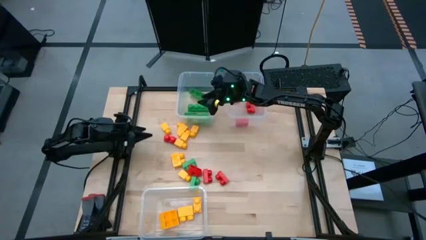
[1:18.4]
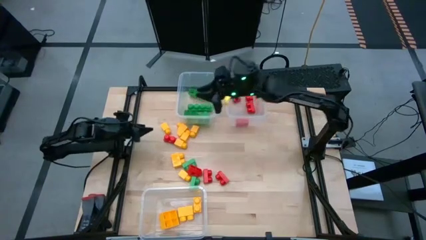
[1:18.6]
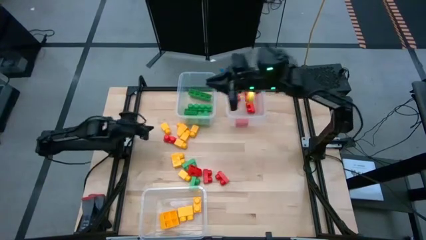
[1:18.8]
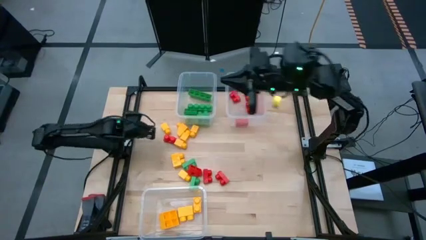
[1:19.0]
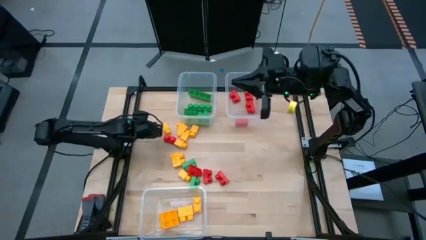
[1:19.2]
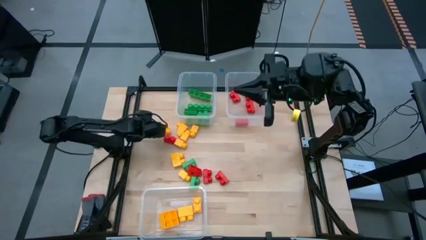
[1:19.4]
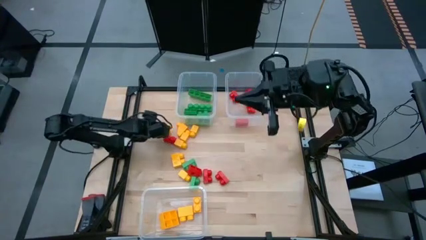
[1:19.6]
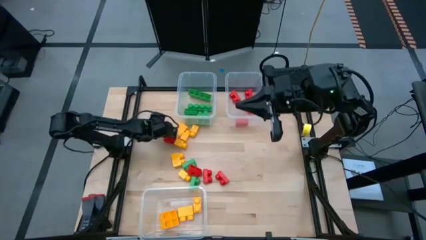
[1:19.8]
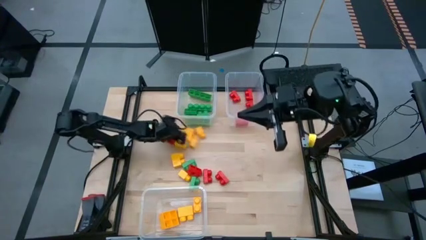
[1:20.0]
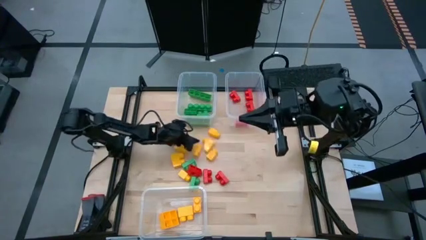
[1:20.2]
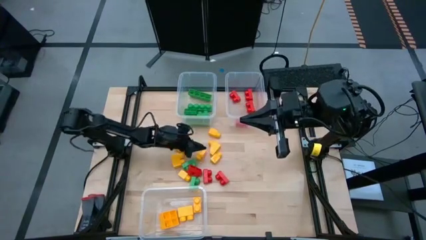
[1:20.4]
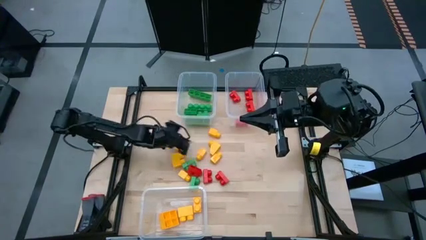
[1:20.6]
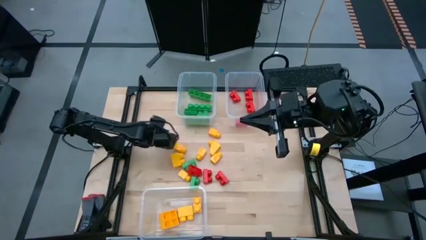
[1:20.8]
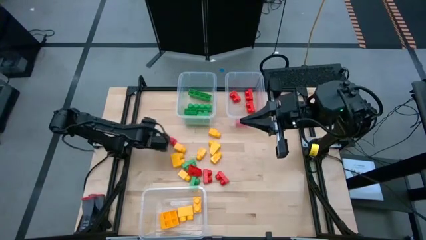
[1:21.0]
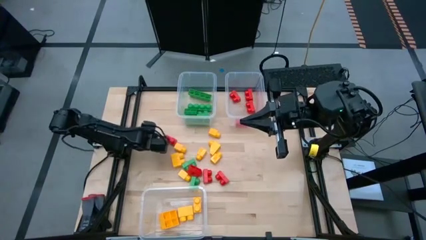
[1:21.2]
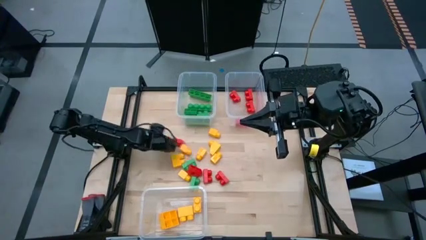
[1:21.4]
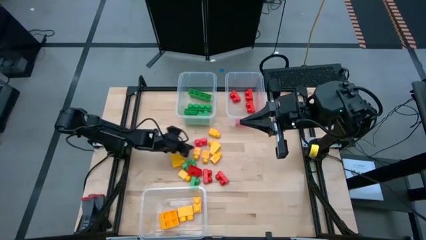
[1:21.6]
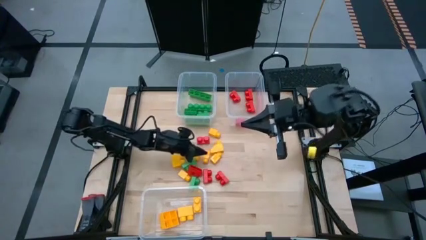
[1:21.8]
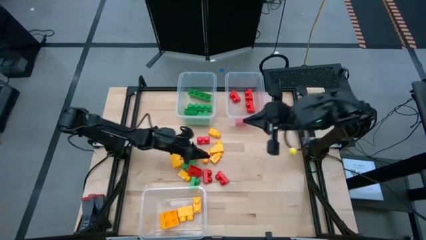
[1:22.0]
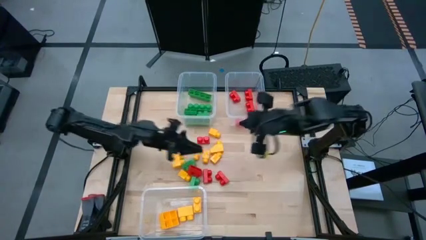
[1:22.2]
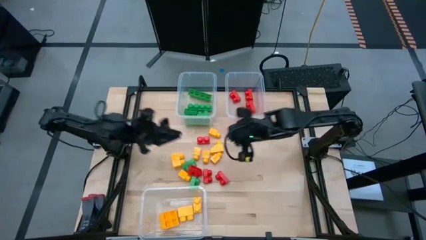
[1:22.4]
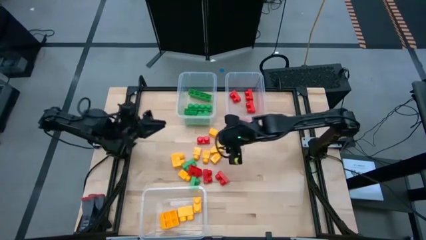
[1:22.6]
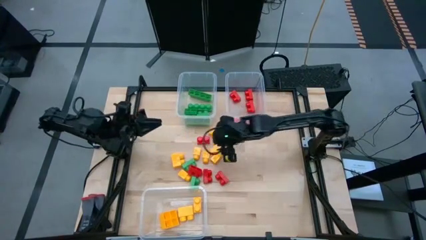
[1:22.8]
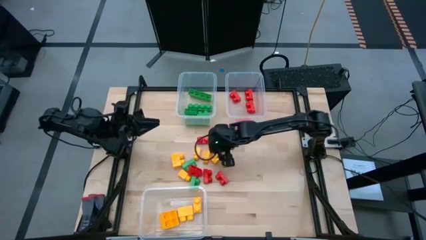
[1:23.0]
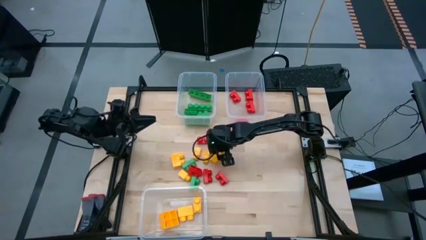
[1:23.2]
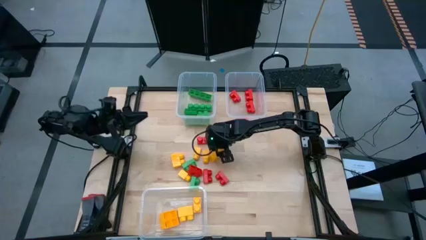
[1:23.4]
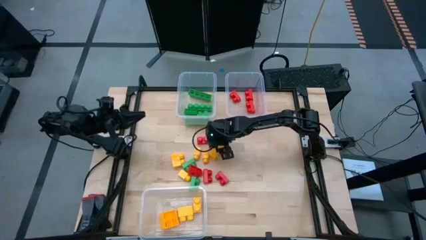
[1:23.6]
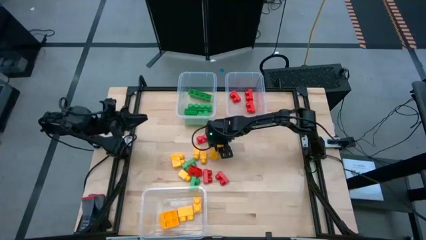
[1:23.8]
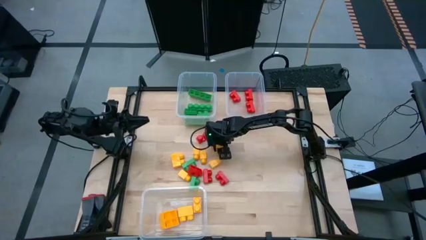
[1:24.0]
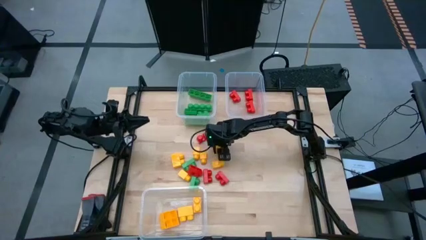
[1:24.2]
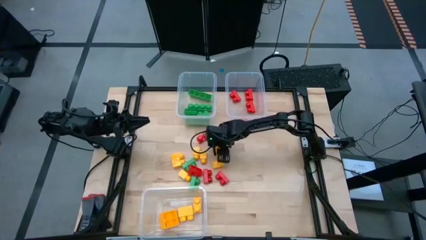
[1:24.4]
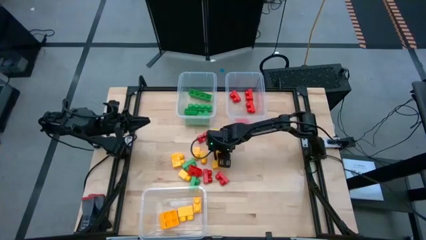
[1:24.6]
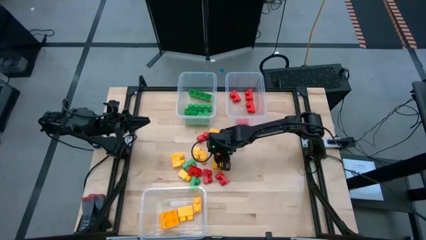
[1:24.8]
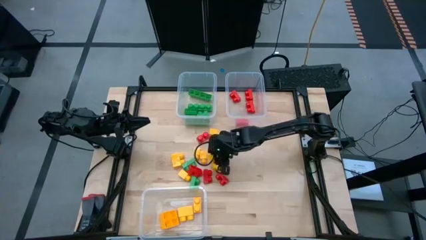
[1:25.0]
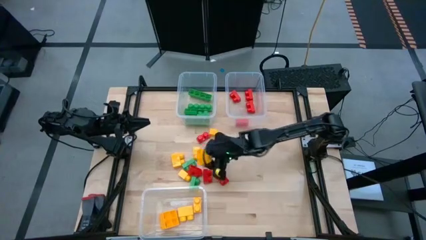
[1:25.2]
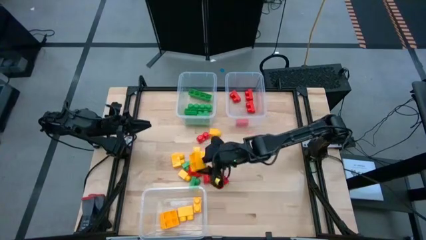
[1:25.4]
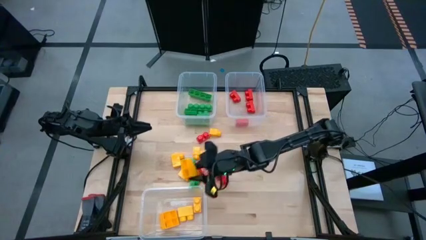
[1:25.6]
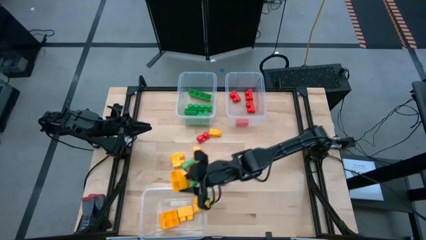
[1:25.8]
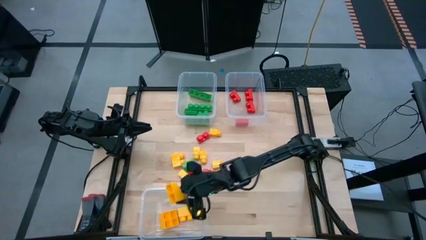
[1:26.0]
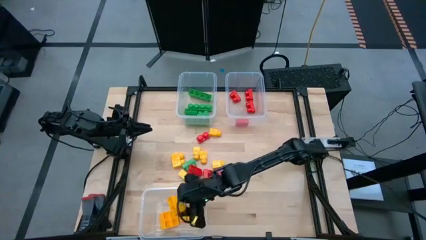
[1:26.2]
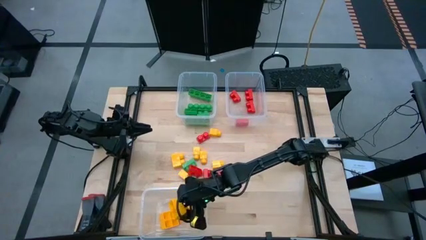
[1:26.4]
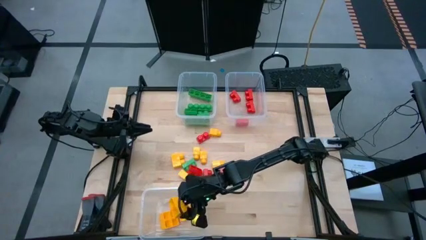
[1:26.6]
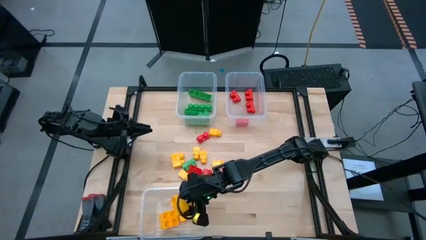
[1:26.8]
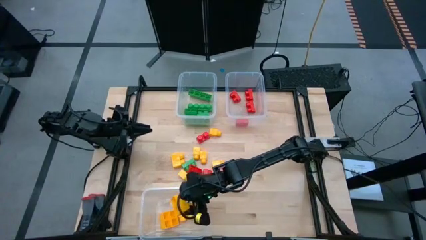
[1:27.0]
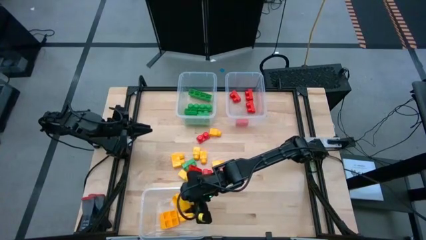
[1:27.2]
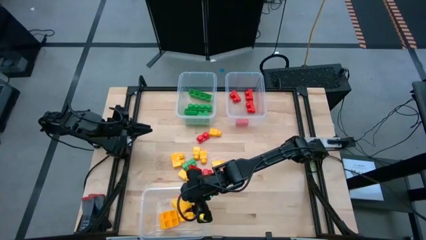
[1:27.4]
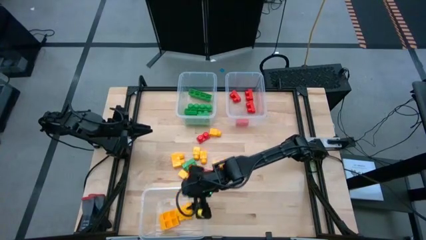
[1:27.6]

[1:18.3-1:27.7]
Task: Sort blocks
Put the yellow game piece into the bottom transparent bin

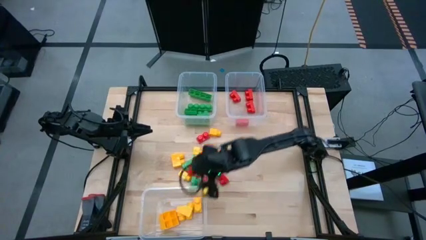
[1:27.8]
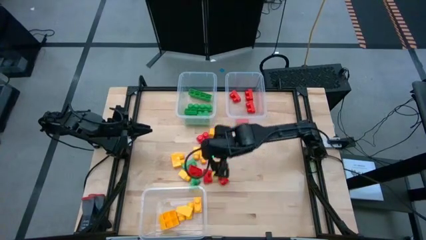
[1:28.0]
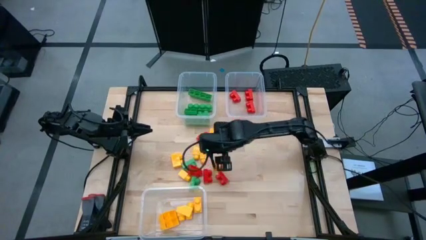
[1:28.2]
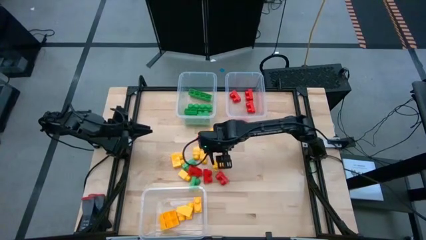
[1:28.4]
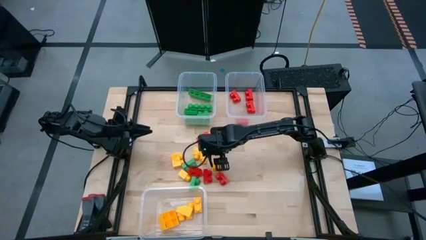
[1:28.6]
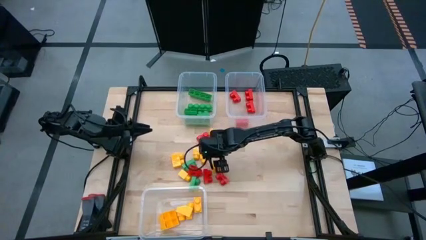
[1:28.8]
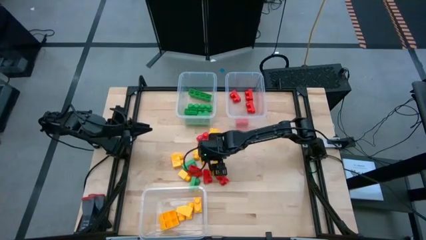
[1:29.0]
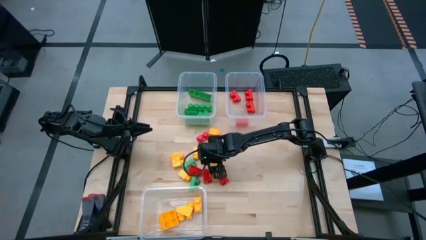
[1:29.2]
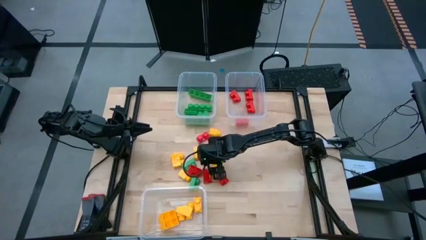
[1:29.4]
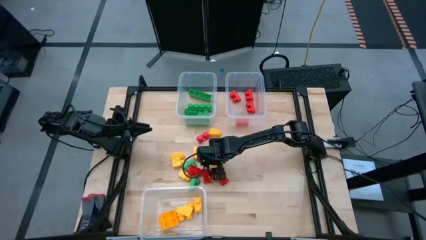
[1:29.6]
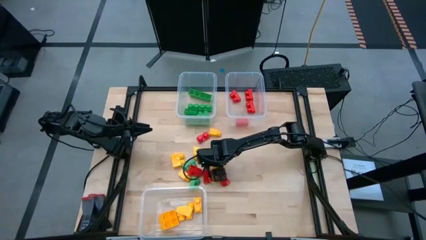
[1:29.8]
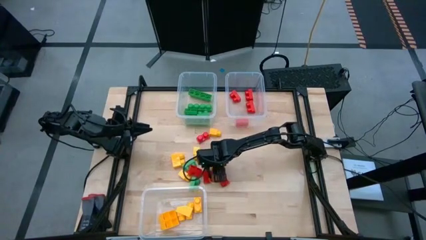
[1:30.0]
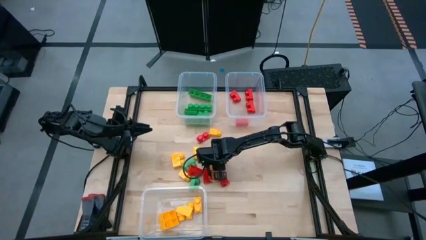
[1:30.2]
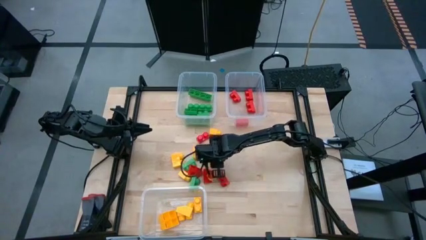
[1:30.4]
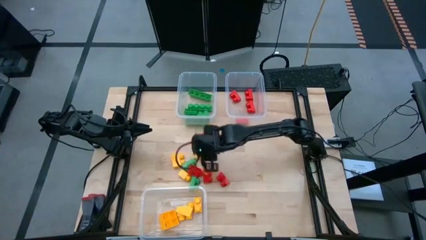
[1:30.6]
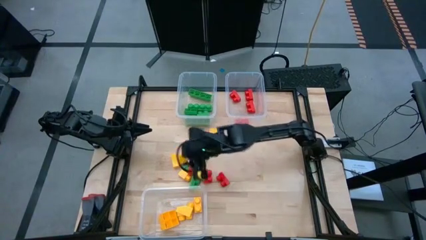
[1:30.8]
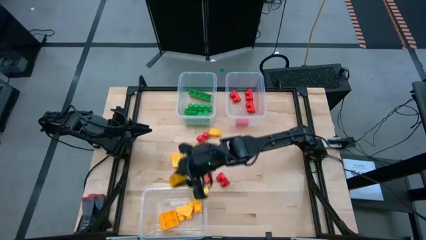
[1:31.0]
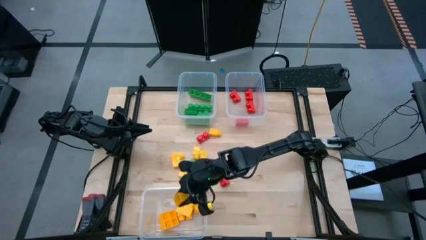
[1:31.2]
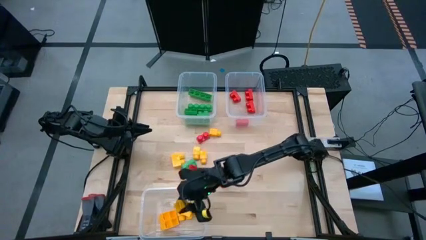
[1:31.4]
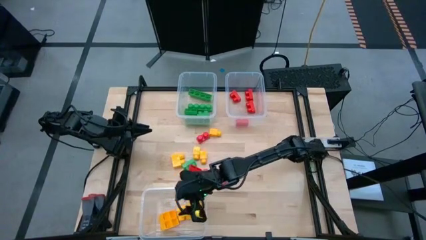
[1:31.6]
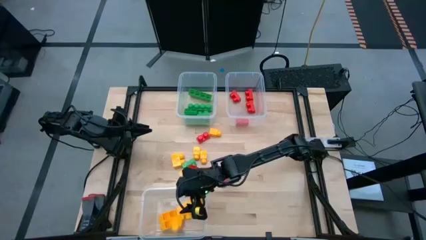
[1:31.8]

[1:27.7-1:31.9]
Put the yellow game piece into the bottom transparent bin

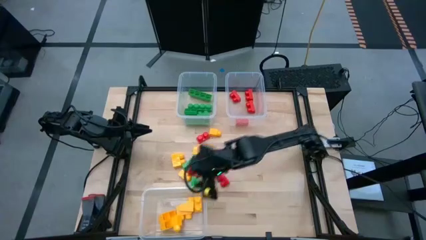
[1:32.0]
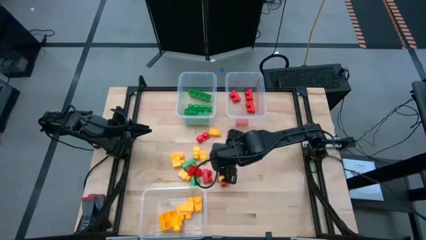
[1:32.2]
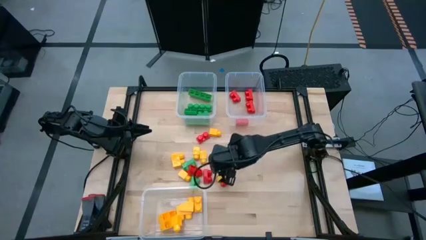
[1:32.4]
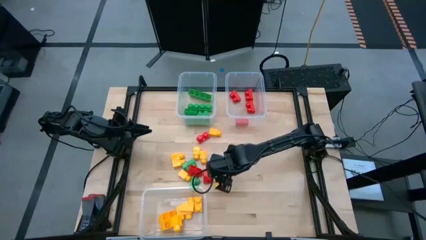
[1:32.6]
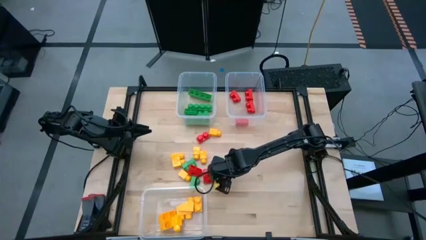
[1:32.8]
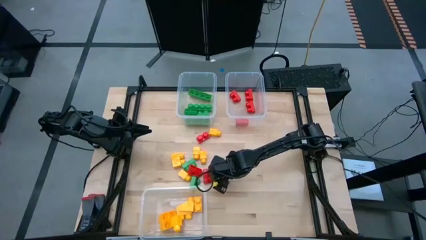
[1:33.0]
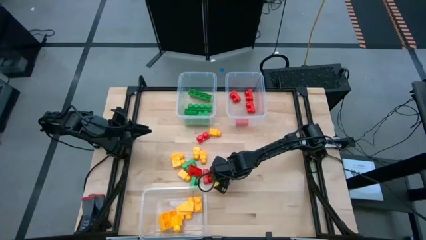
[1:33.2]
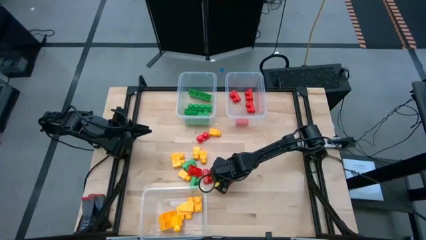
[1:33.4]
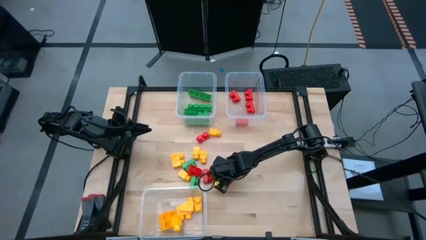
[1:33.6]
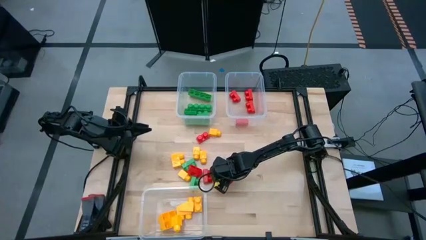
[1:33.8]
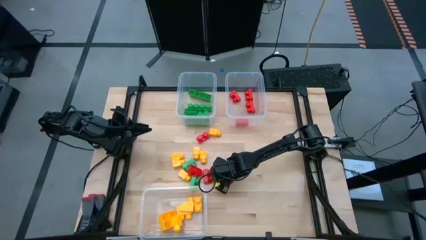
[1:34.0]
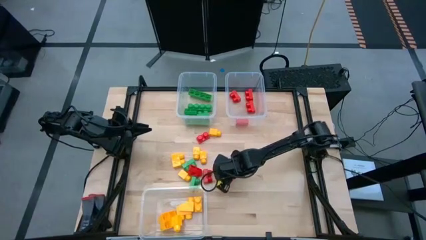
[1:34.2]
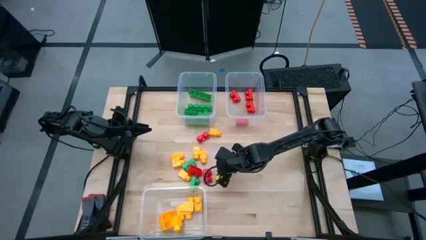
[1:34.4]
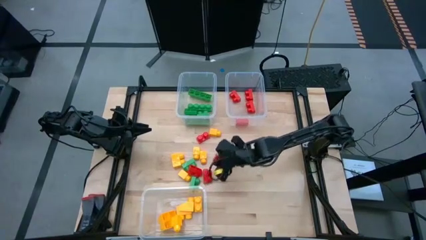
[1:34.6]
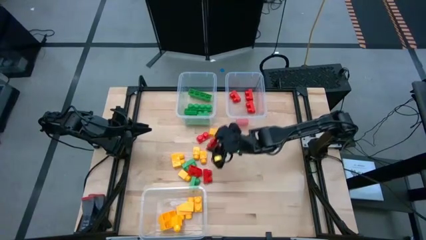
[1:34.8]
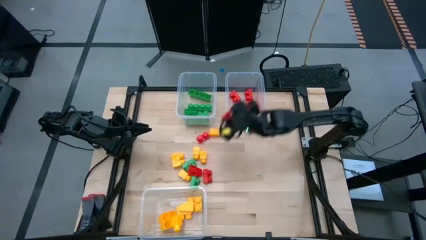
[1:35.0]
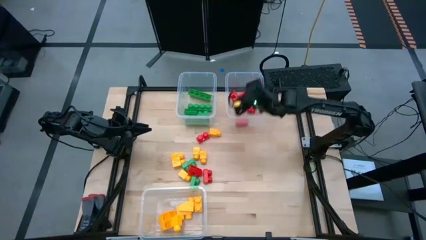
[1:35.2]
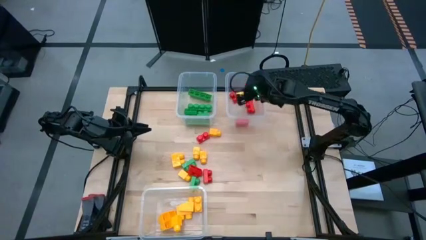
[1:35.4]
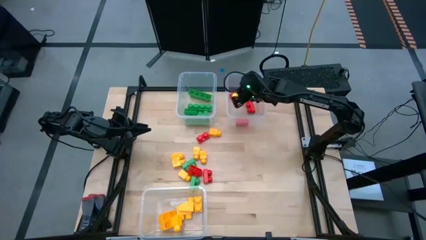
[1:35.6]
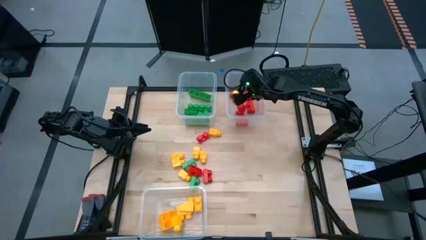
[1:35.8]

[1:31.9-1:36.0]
Put the red game piece into the top right transparent bin
